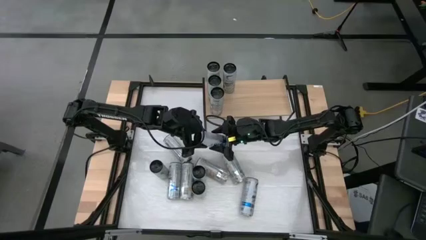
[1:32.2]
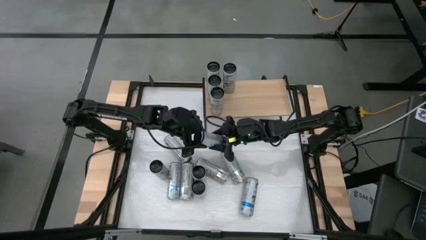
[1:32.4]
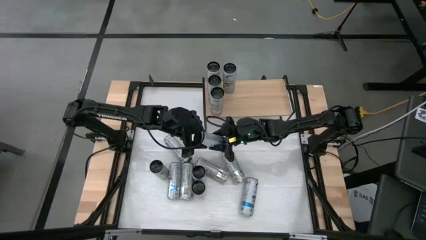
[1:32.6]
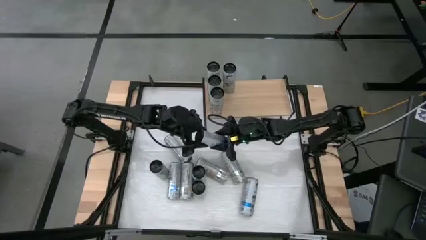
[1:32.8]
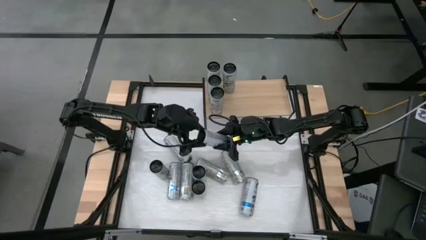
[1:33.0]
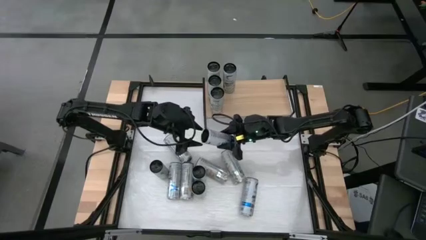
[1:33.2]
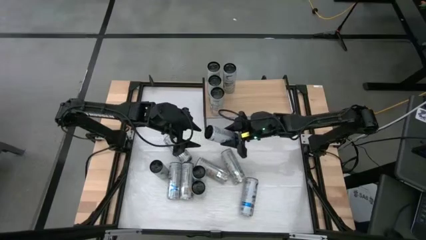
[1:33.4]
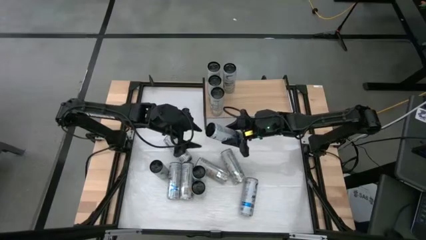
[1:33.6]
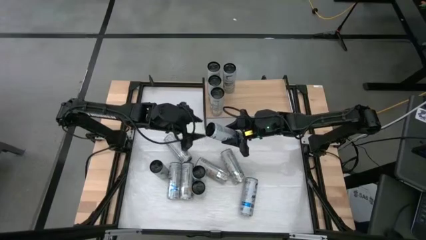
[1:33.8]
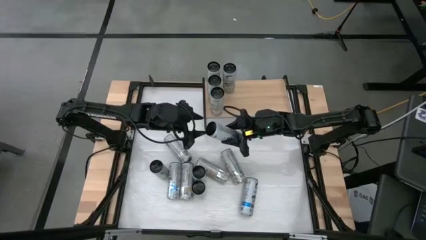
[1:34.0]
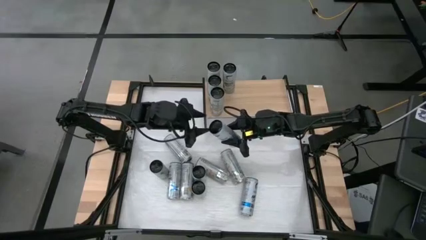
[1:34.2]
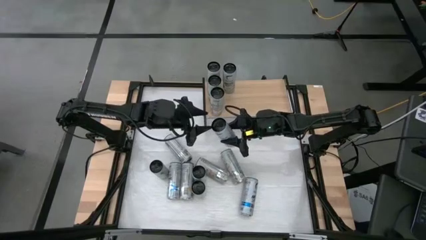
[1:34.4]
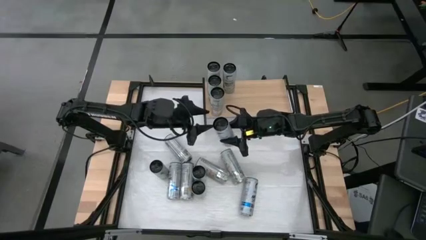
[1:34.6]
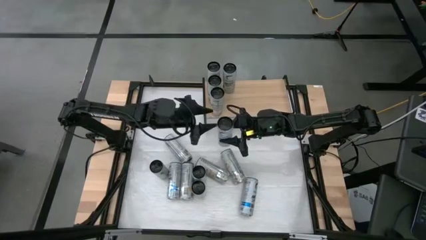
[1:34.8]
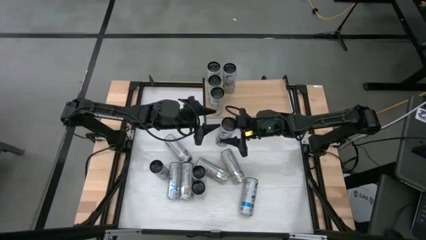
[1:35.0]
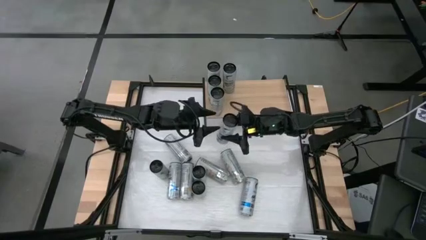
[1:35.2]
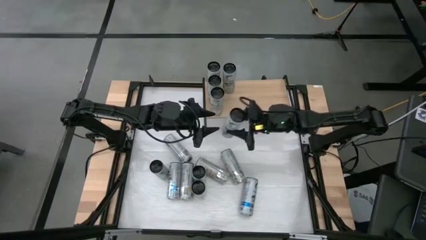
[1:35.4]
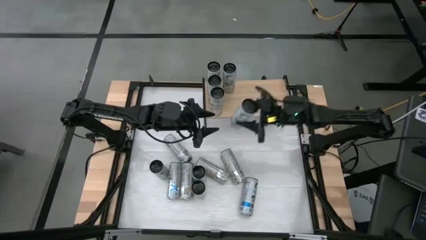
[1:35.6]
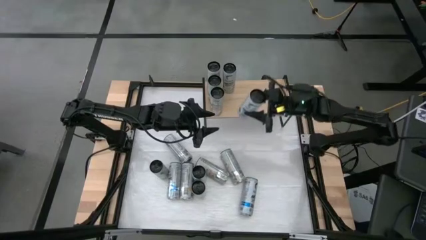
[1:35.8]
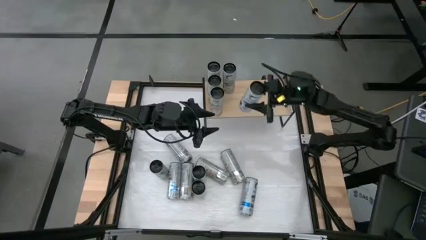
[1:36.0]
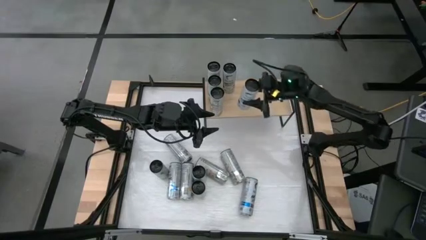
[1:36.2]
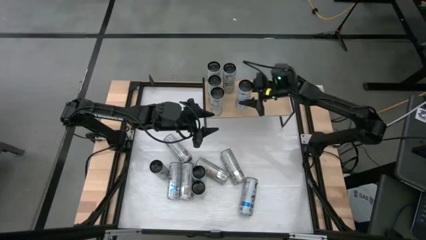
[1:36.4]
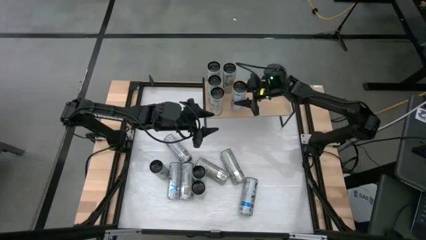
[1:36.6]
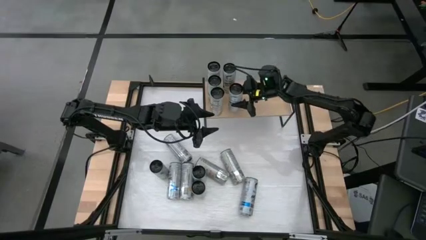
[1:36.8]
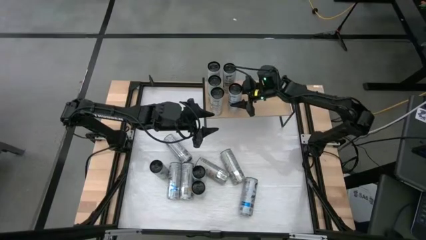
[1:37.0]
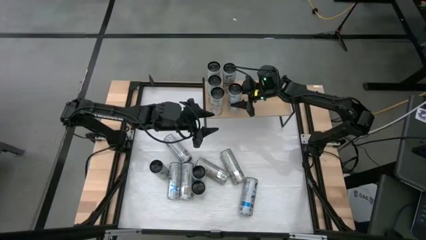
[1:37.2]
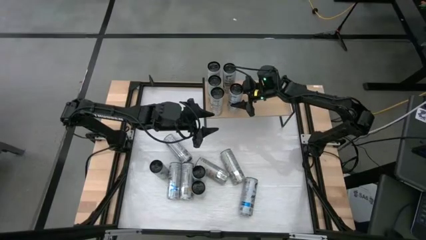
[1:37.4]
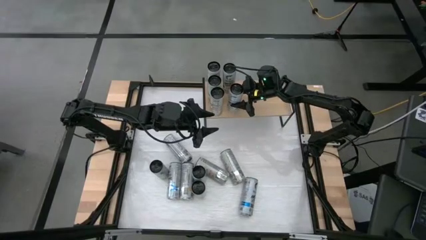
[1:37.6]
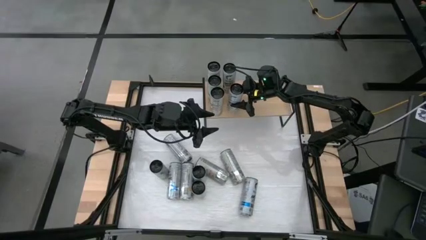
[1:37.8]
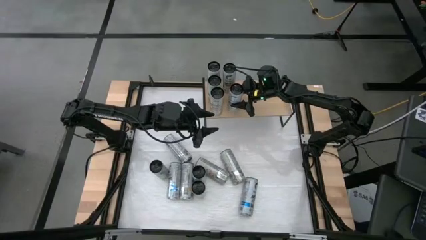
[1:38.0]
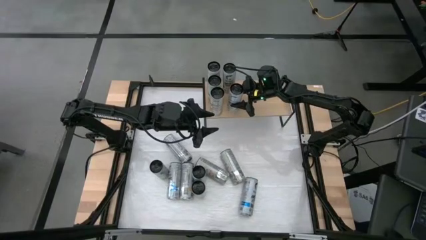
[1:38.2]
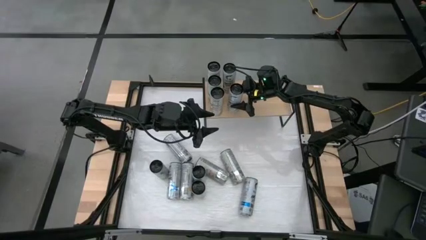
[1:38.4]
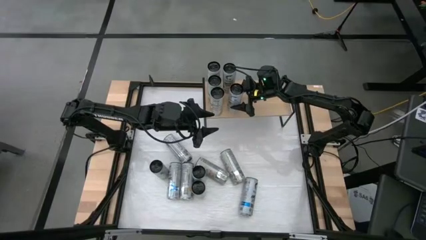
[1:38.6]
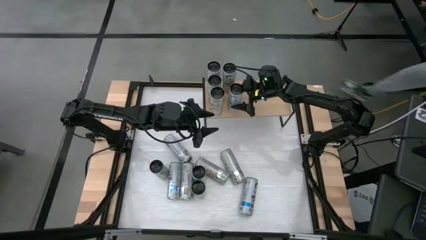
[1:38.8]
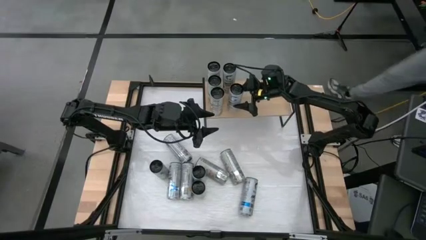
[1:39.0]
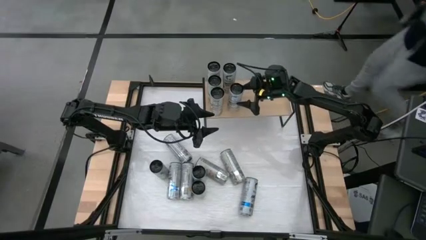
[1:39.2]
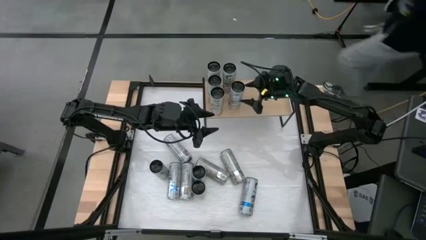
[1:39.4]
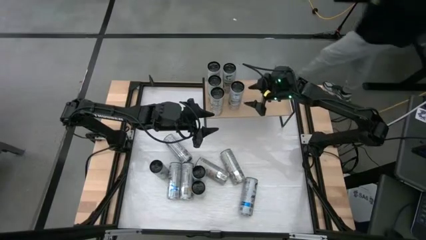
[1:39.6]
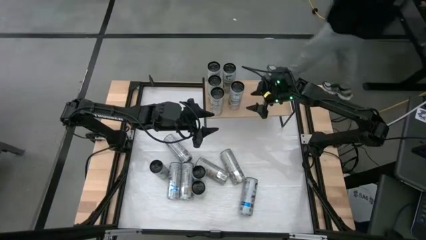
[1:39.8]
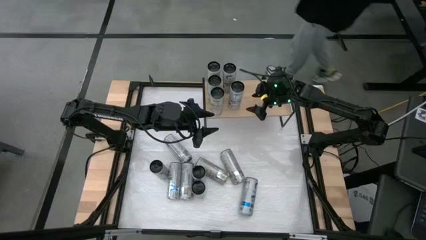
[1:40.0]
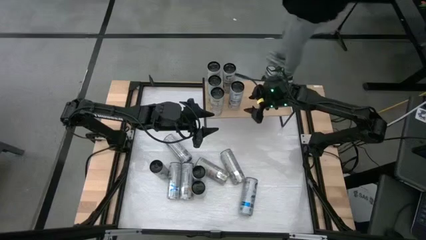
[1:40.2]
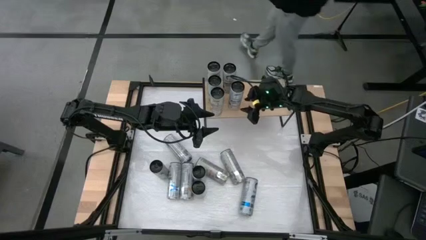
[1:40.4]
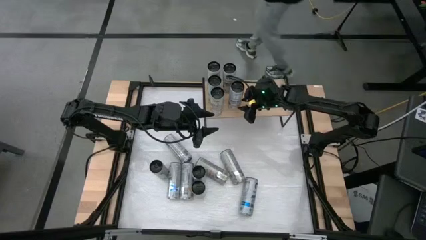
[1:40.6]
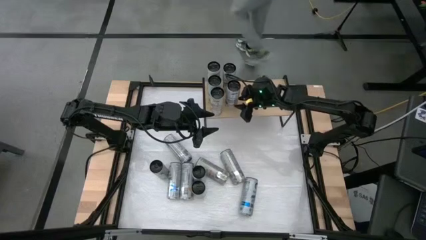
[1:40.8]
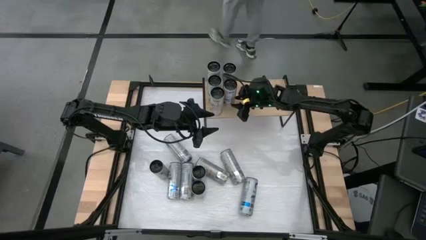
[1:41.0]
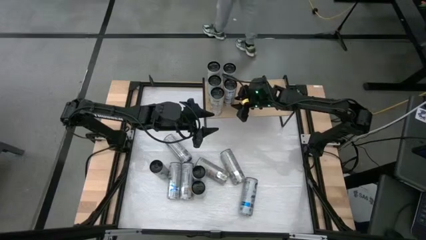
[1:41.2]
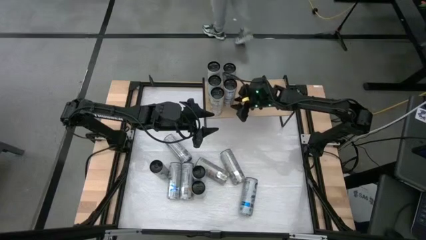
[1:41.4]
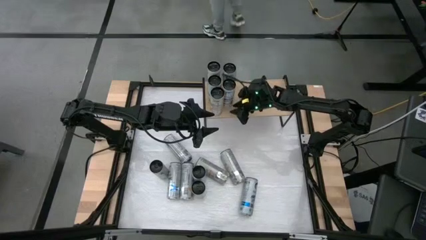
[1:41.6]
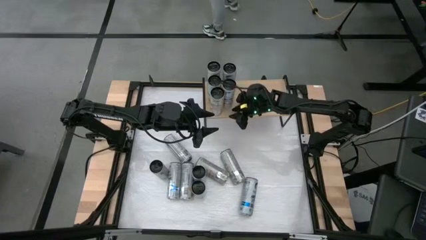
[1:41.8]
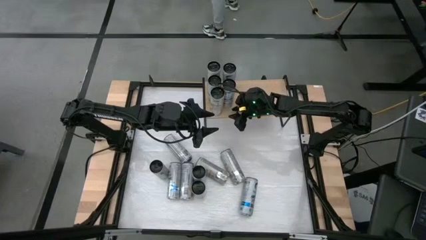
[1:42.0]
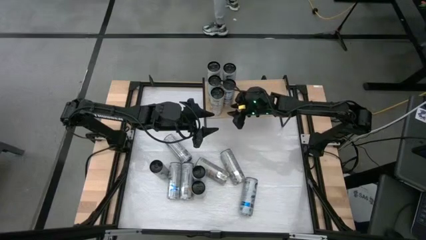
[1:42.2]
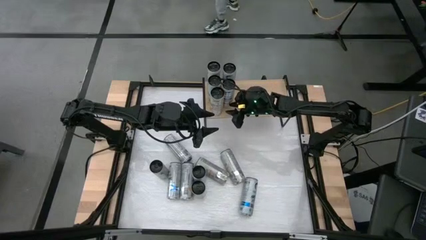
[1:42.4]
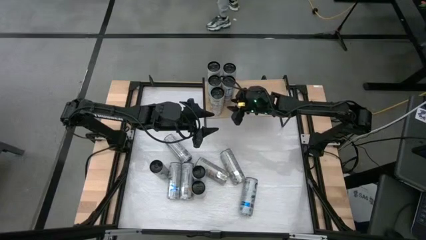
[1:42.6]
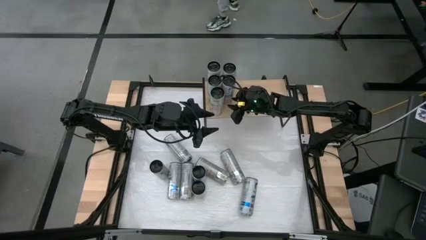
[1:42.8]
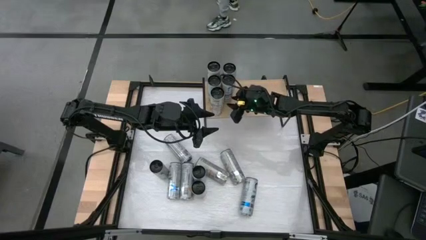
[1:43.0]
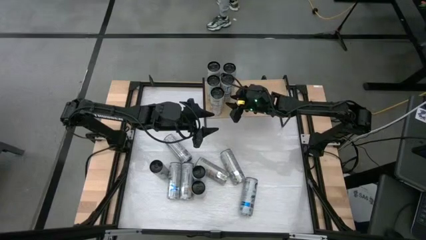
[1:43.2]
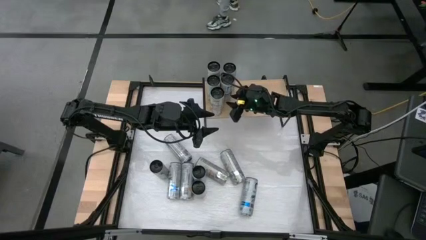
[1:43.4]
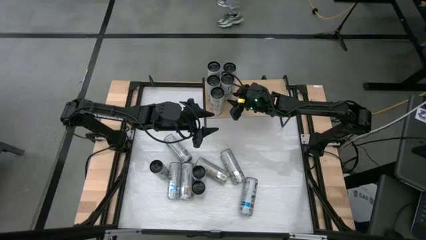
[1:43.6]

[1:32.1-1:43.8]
Task: Place canned beverage on shelf
Put the blue soda can on the shelf aligned with the other blue soda can

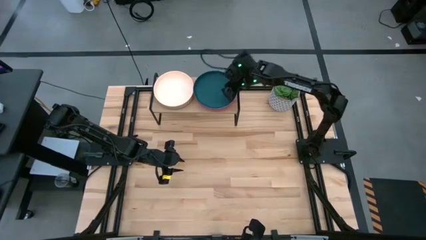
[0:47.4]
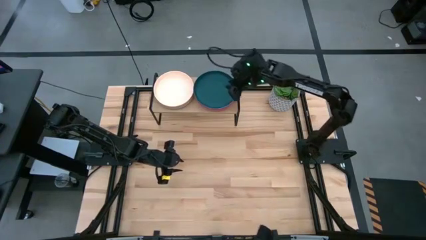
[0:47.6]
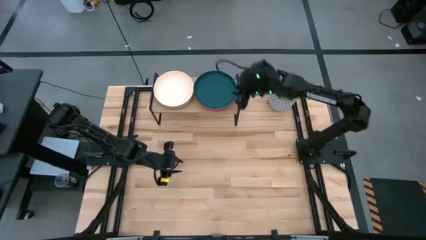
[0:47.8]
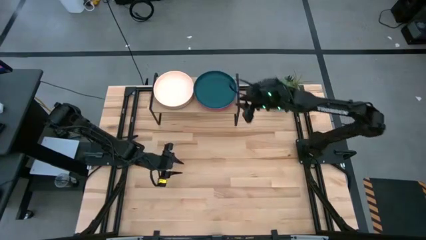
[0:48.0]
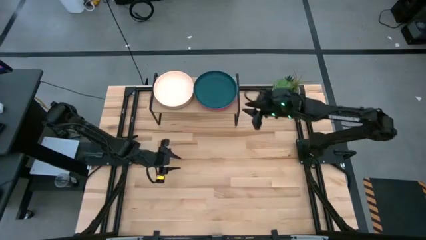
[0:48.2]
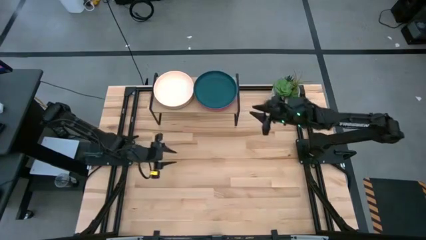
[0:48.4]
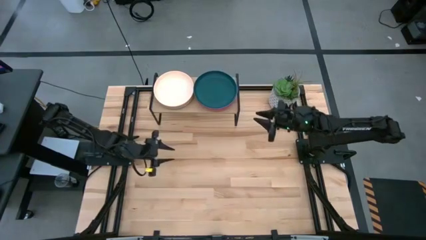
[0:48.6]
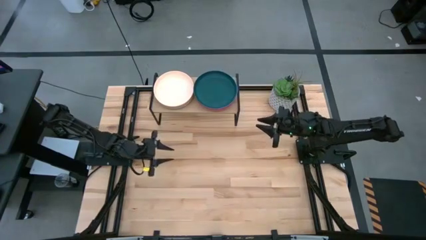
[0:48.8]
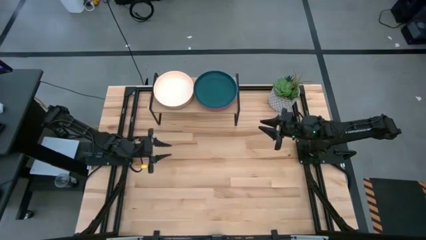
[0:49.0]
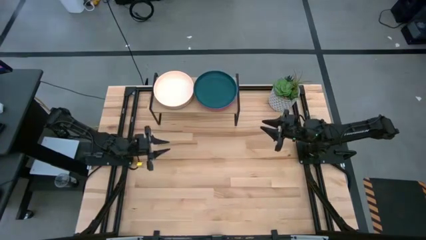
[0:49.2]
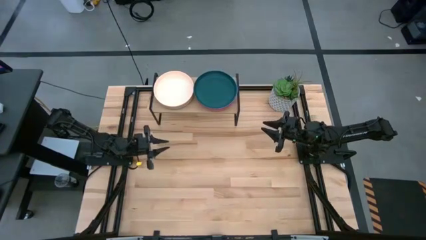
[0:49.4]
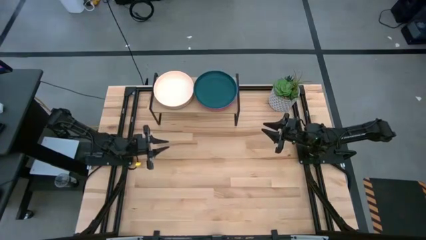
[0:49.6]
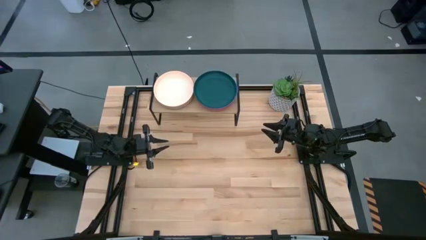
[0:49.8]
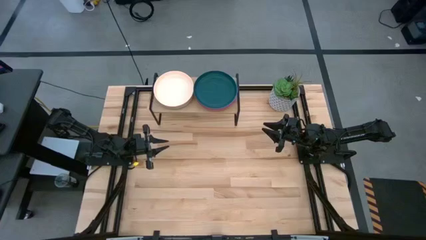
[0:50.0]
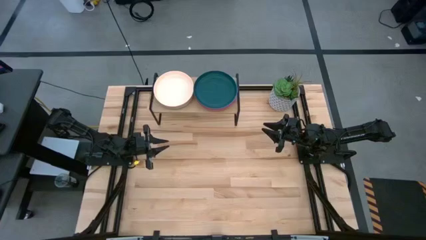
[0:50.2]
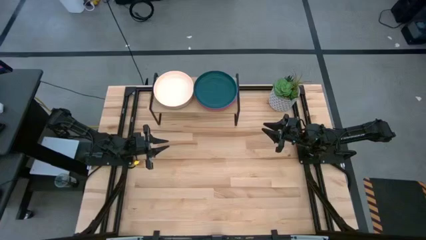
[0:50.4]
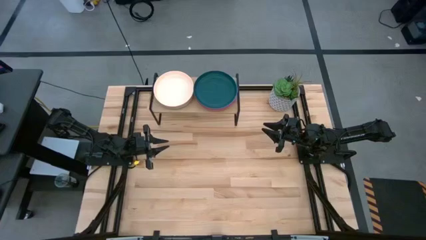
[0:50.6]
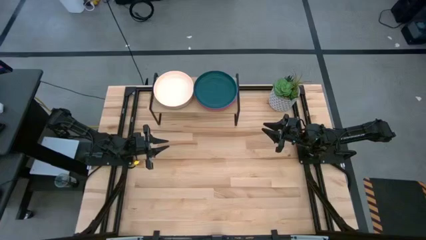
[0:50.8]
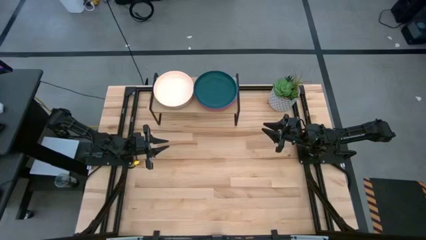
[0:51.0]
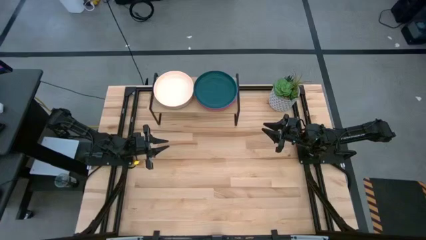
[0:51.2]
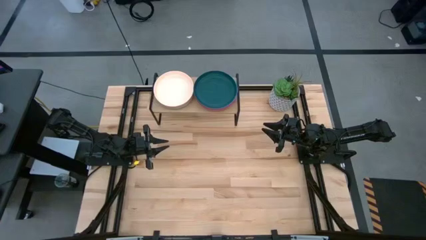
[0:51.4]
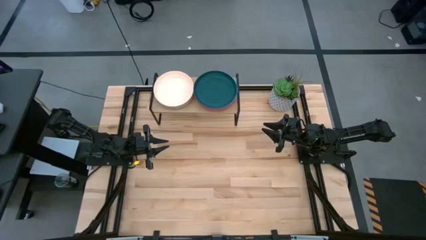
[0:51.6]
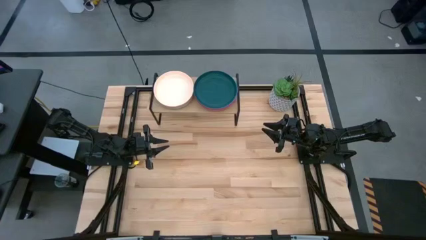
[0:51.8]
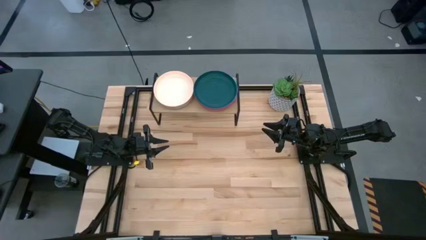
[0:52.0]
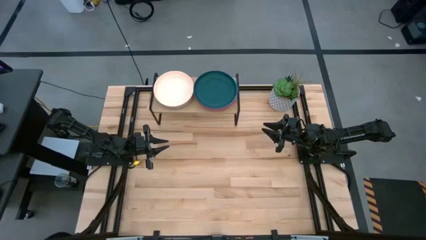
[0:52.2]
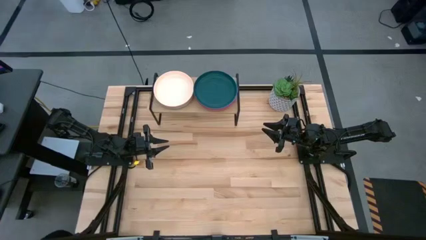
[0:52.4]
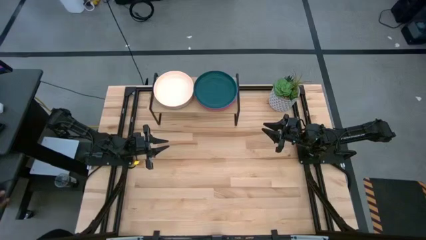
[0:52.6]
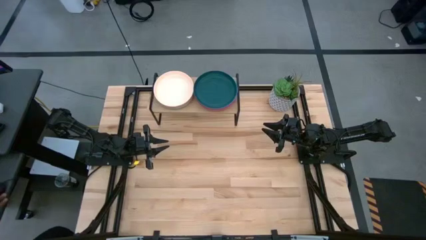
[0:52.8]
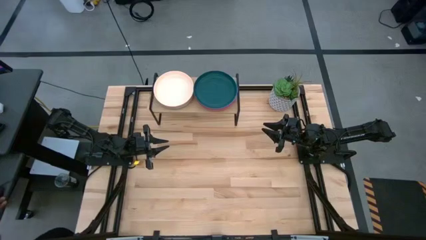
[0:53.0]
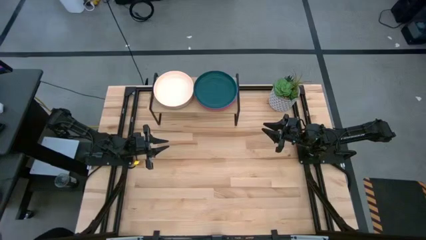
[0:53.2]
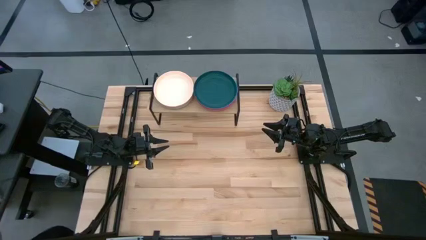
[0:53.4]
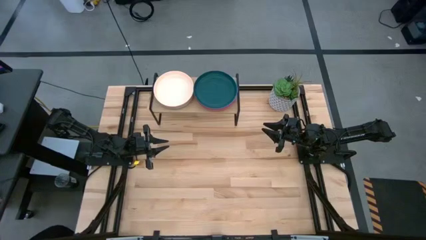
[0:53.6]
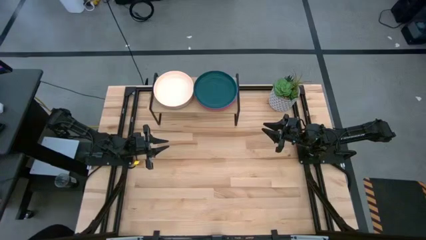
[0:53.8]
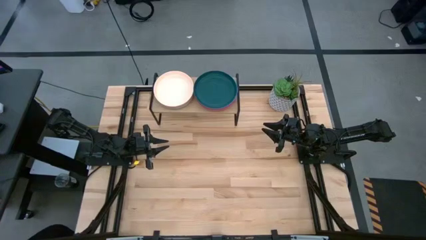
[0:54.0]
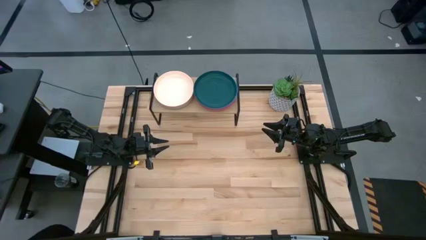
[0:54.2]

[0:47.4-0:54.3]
Task: Place and stack plates onto a shelf
Return to Home Position
